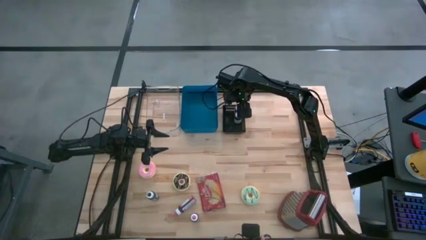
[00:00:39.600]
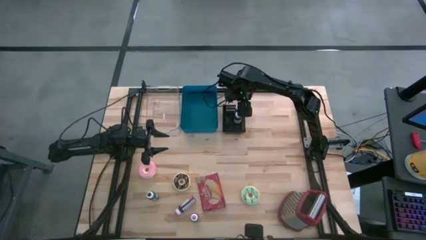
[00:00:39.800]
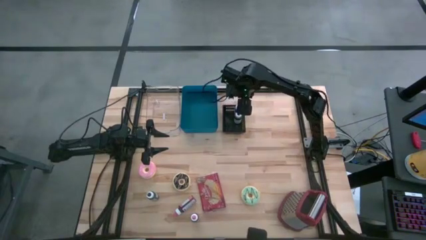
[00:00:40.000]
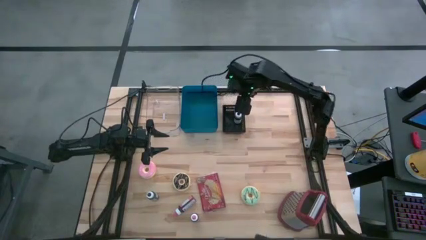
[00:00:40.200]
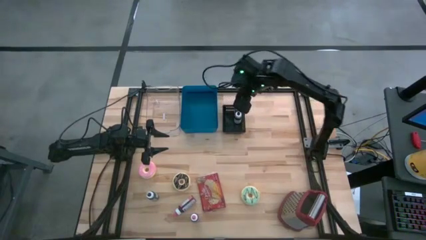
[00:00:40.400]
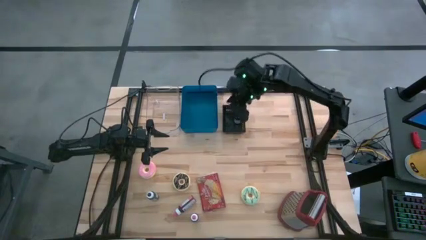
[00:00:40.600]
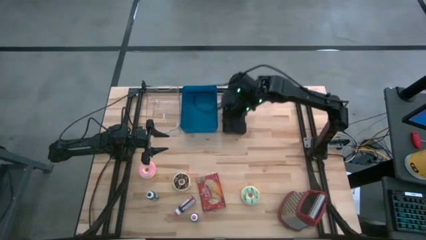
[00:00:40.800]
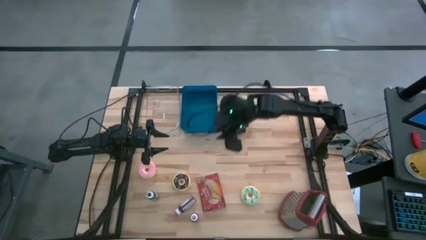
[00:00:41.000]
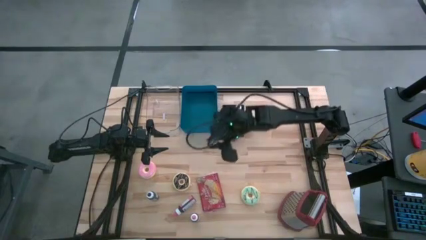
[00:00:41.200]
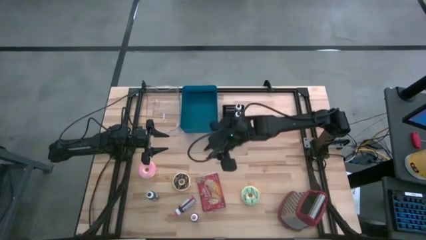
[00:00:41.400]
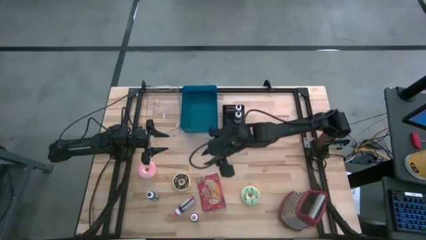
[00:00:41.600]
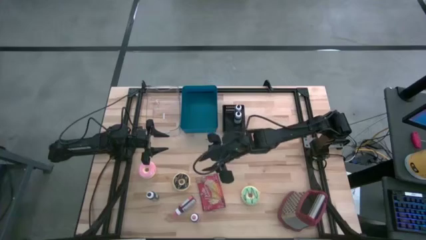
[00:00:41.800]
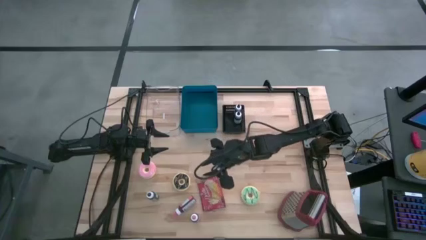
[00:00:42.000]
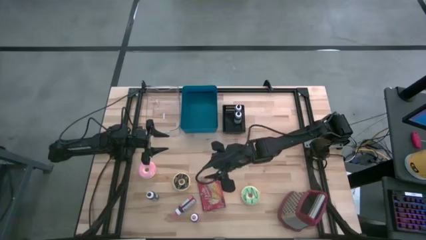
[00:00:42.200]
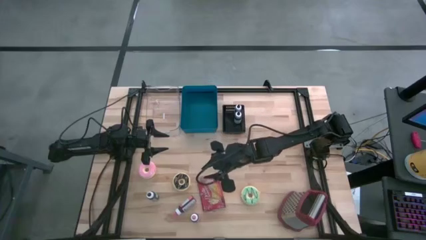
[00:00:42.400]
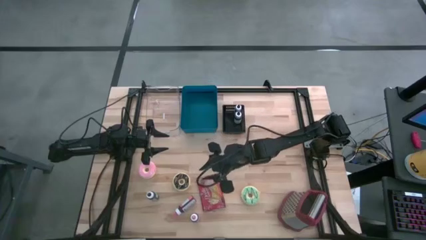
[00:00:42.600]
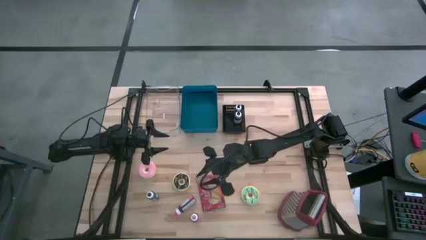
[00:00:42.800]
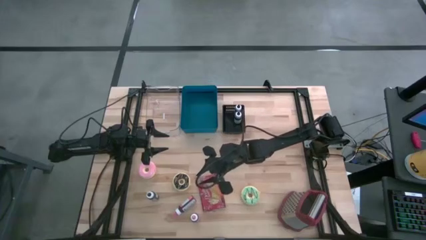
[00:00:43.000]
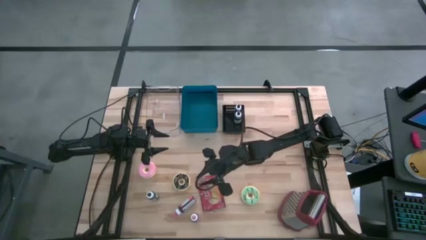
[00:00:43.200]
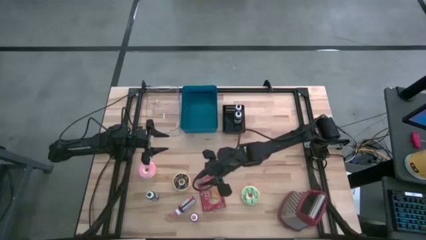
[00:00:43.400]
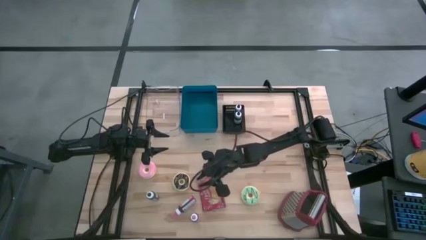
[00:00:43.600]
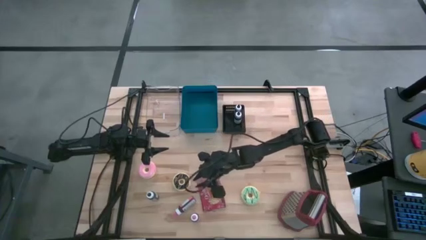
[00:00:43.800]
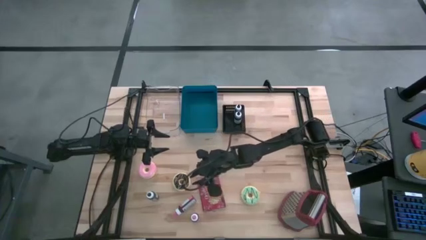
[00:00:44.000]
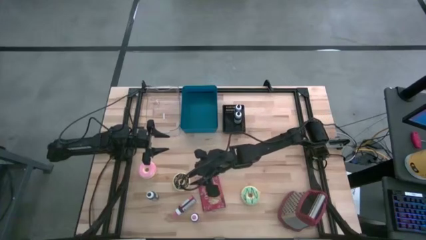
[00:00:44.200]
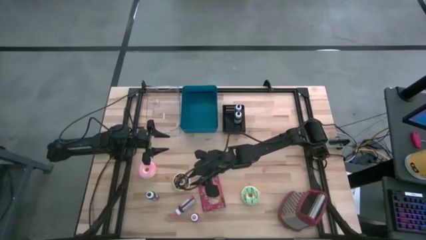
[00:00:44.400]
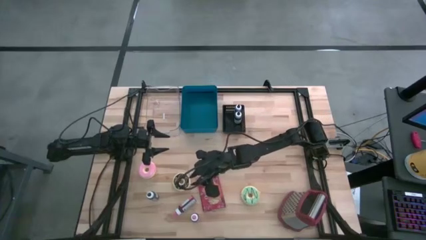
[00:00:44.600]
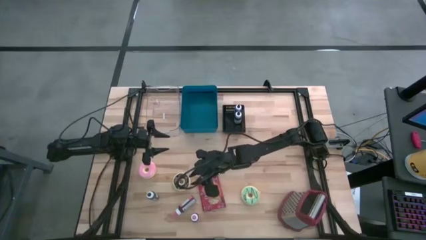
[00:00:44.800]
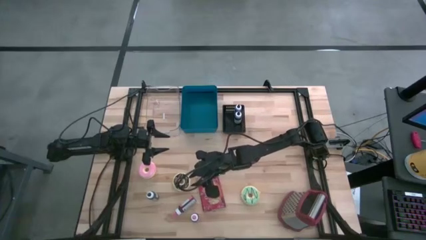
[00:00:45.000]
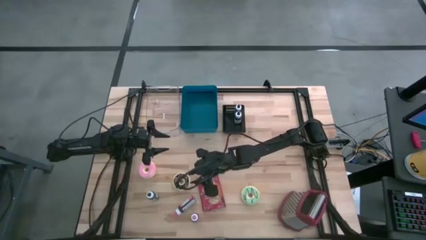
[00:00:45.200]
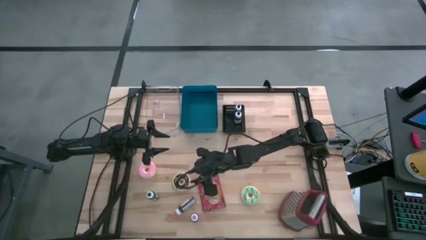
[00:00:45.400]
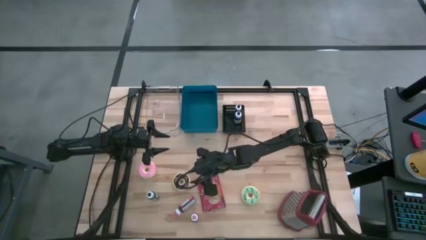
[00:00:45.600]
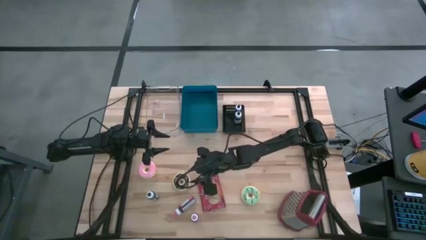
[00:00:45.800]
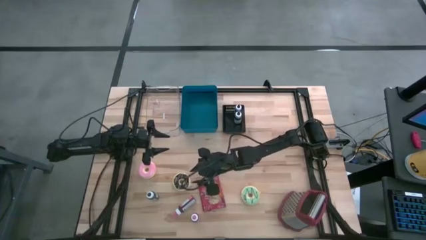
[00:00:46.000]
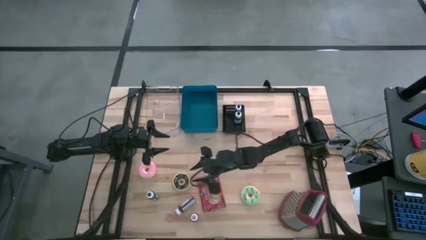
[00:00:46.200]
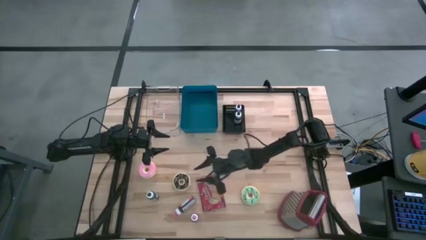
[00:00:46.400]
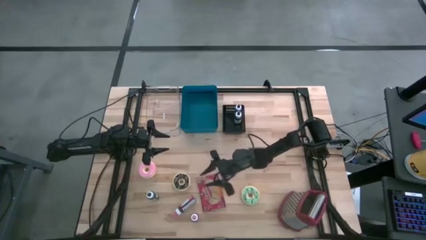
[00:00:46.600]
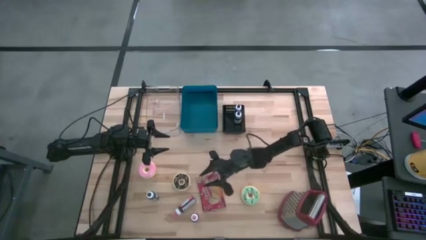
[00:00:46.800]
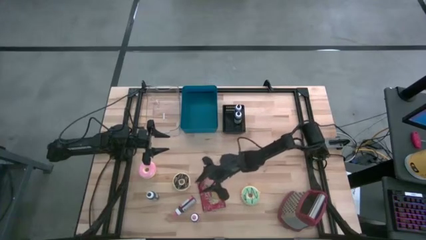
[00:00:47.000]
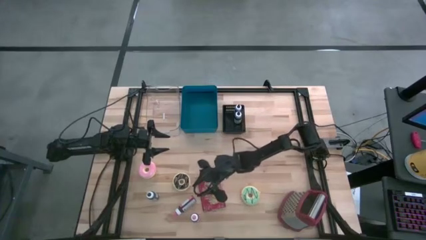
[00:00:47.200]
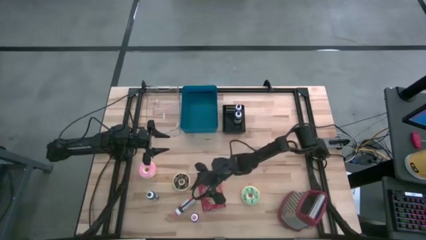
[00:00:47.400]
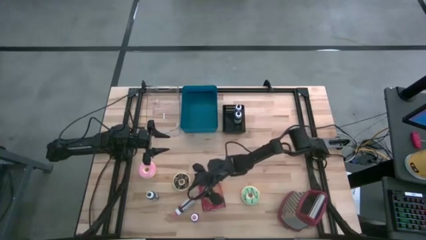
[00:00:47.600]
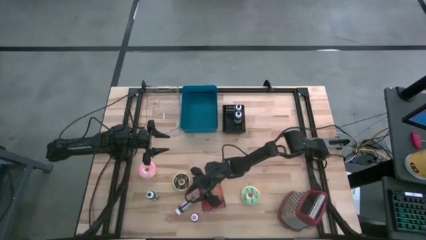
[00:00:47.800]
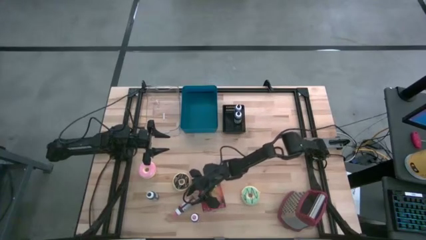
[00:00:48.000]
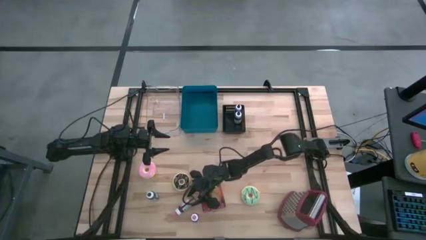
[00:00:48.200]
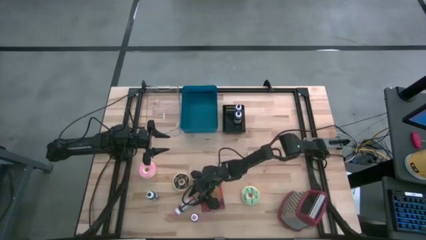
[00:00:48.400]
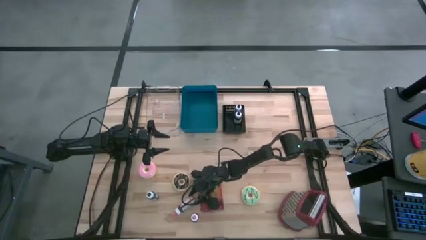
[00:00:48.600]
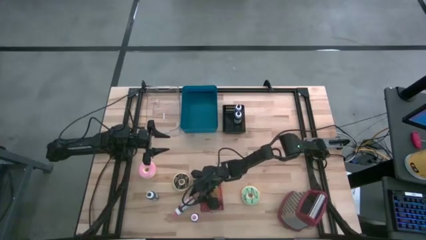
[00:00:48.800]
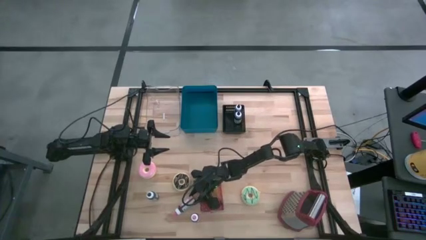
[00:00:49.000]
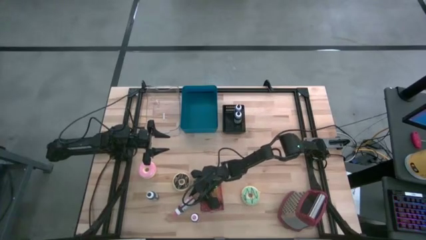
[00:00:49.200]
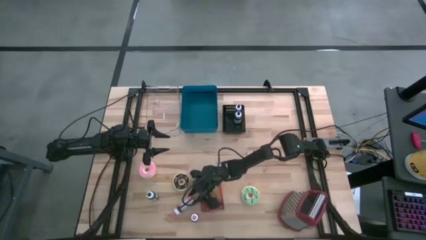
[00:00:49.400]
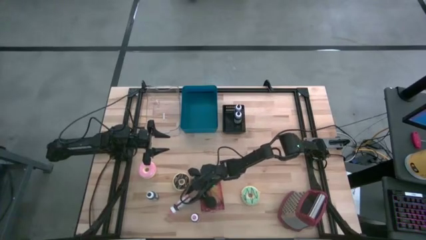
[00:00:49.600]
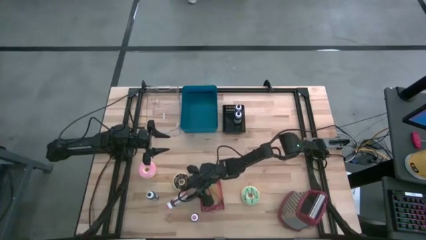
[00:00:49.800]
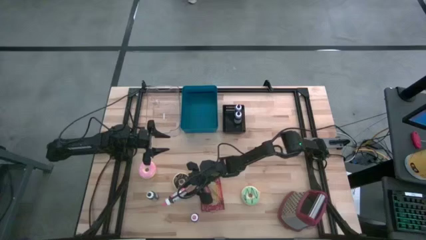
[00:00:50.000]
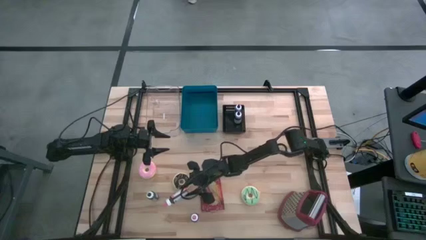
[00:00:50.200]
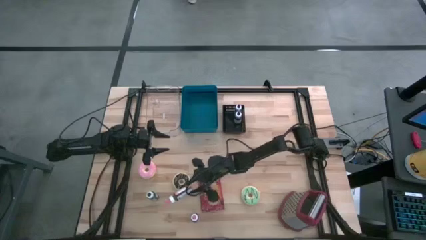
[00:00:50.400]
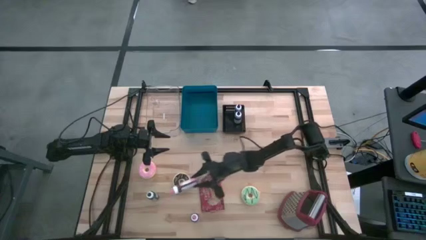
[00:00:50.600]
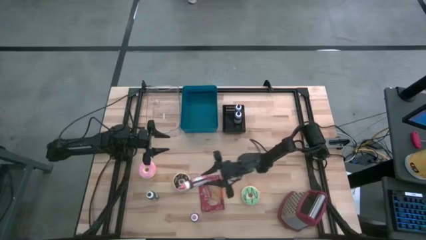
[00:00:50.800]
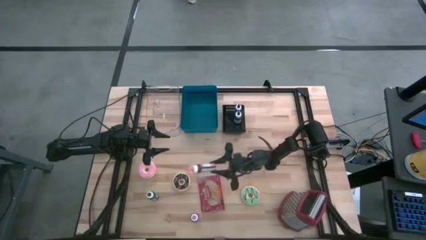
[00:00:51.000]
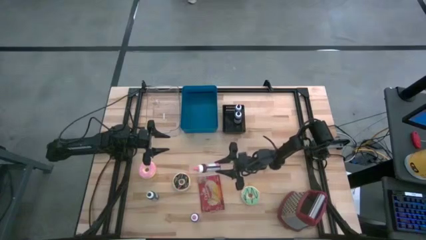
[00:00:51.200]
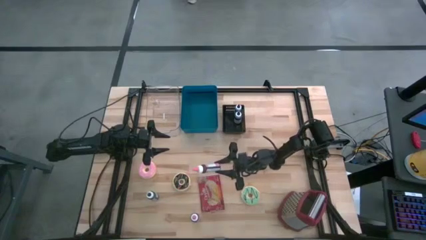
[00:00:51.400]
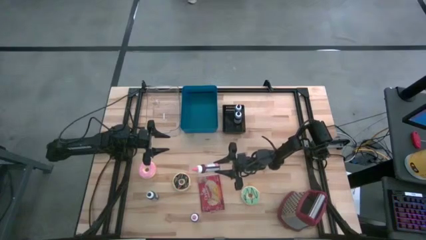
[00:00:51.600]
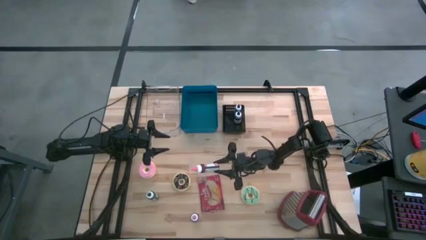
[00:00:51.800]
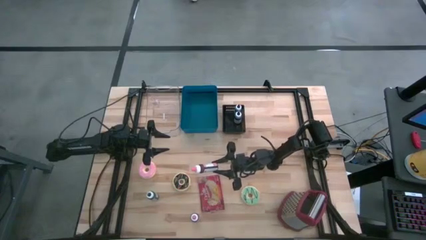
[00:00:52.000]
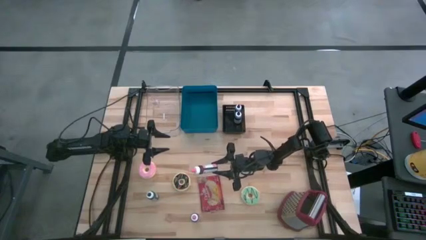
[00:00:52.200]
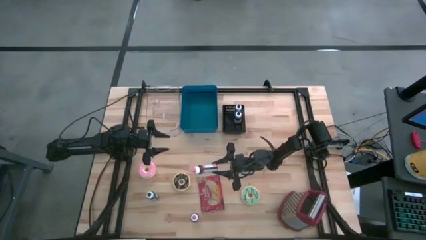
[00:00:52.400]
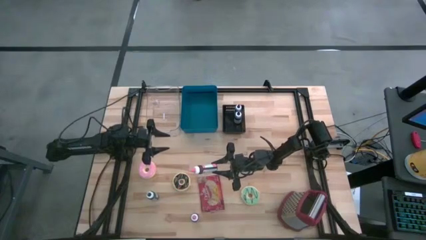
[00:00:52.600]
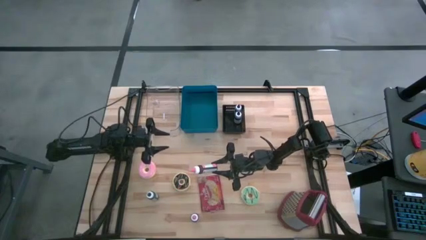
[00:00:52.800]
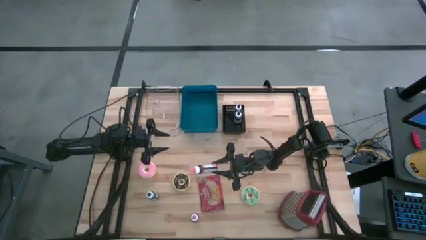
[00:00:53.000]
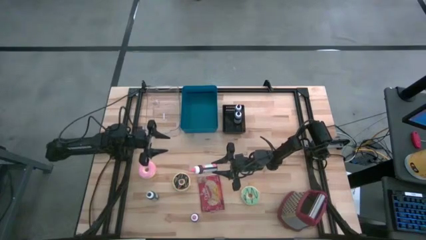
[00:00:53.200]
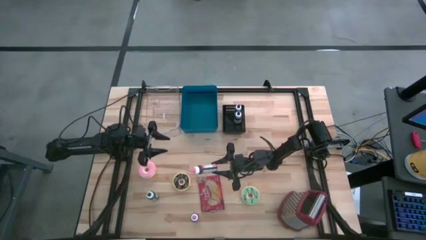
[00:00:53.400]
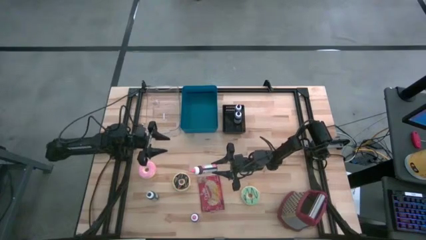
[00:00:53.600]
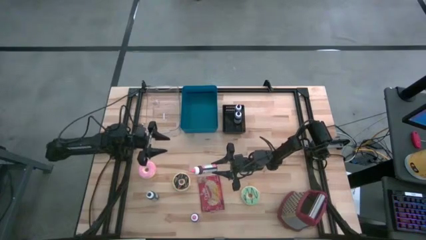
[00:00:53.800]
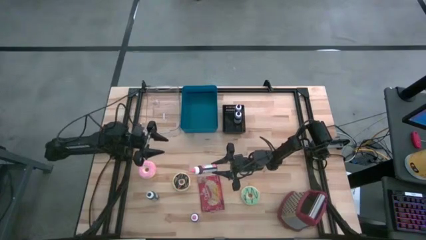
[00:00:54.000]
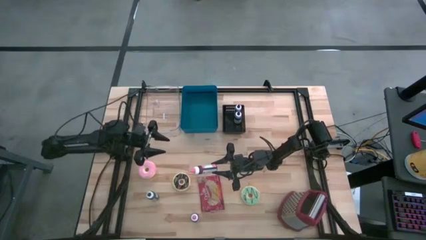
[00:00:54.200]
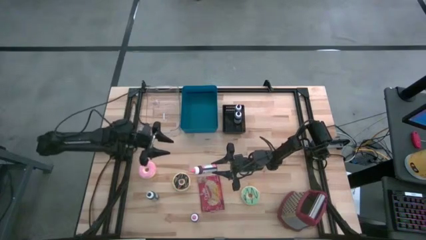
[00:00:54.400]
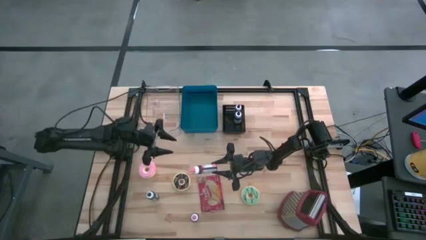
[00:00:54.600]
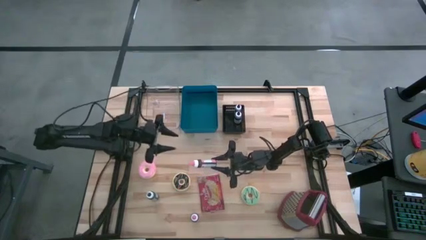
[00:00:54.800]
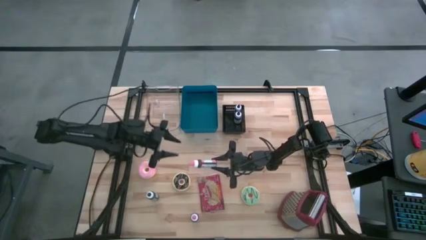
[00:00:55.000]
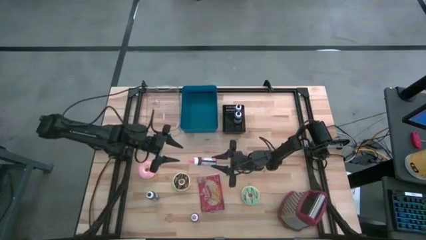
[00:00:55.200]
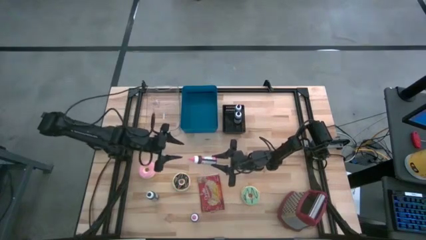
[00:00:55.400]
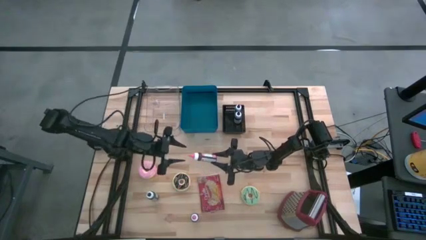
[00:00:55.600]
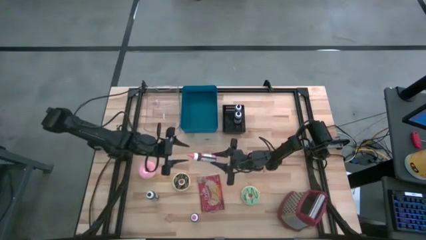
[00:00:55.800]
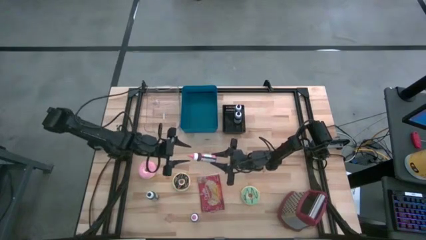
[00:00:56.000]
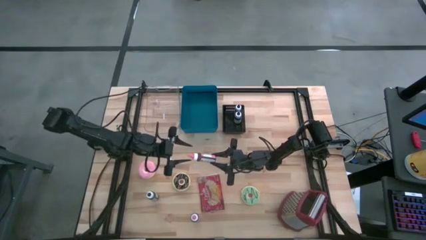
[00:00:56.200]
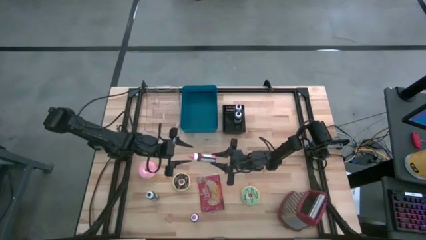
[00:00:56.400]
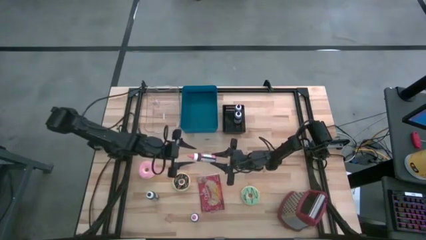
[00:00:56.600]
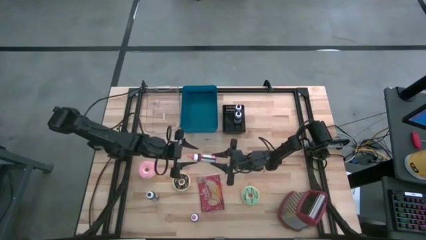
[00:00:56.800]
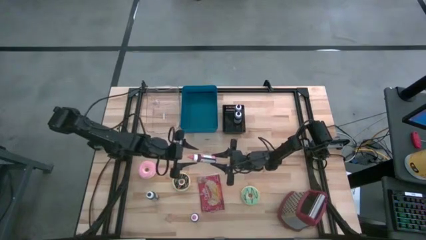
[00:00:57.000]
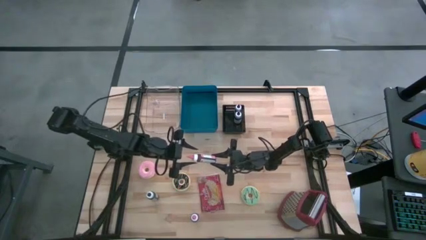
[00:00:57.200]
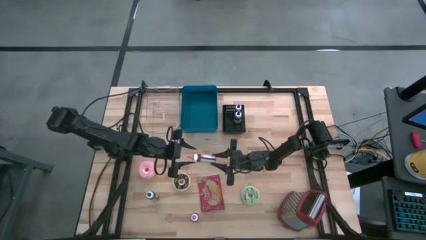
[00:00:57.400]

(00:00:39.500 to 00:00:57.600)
Put the top pink food coloring bottle into the black bin
